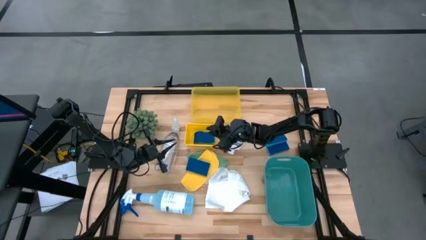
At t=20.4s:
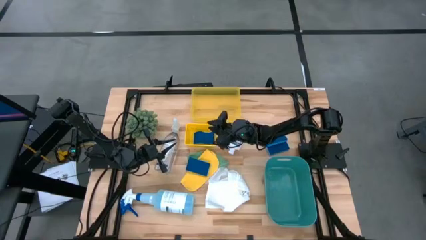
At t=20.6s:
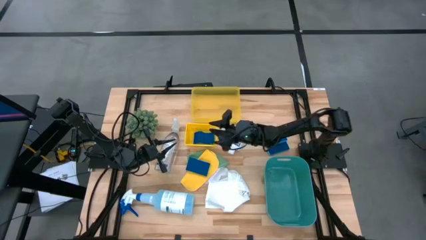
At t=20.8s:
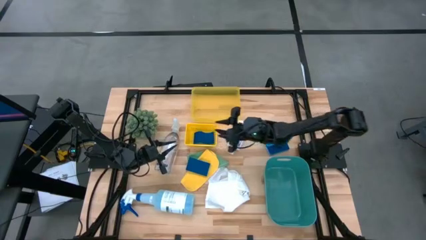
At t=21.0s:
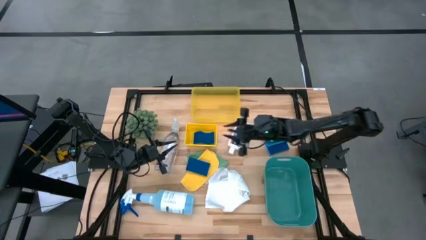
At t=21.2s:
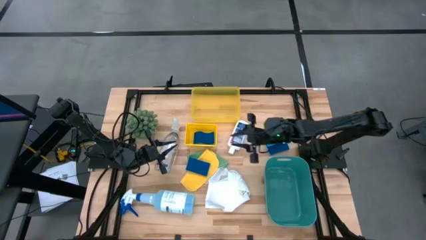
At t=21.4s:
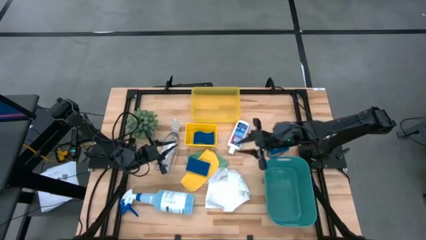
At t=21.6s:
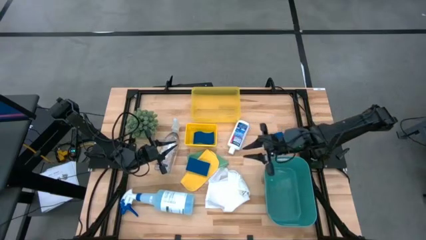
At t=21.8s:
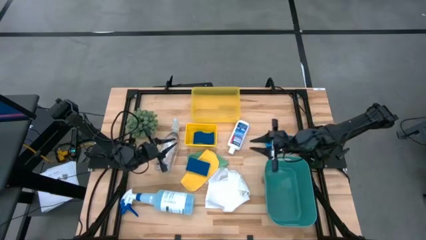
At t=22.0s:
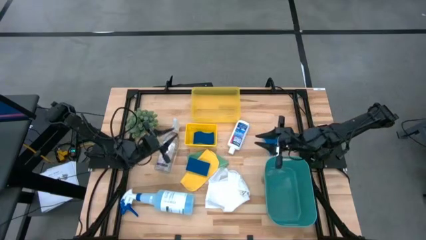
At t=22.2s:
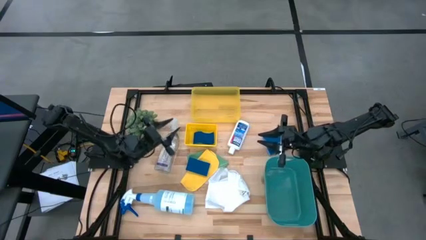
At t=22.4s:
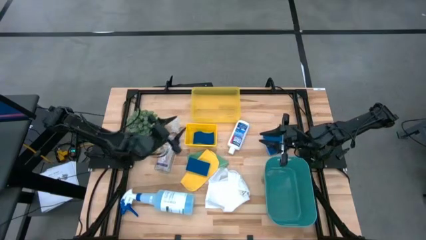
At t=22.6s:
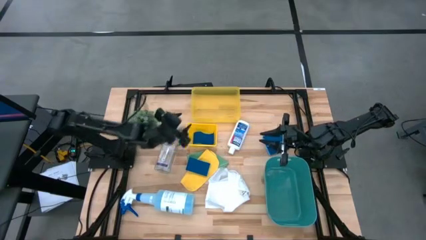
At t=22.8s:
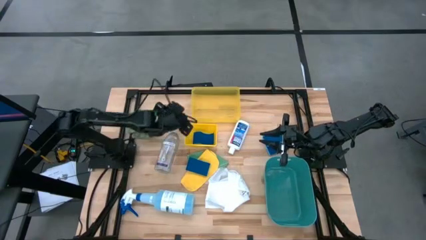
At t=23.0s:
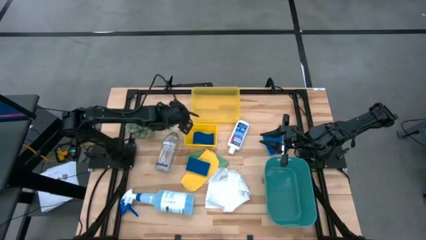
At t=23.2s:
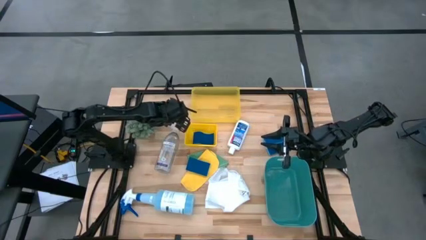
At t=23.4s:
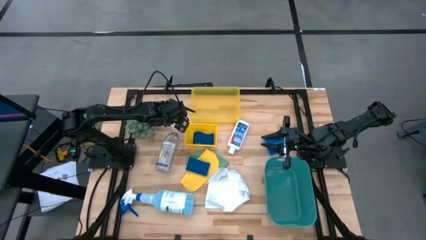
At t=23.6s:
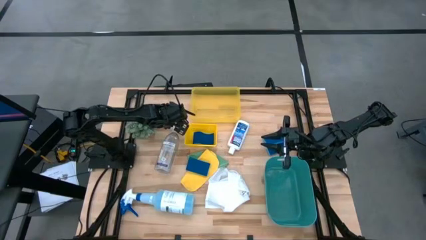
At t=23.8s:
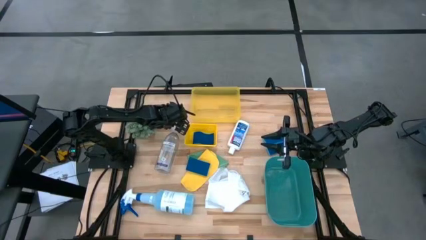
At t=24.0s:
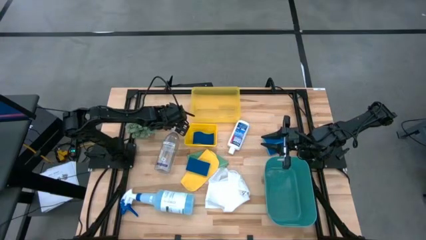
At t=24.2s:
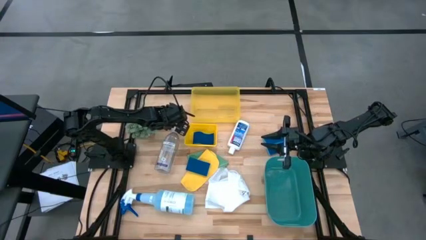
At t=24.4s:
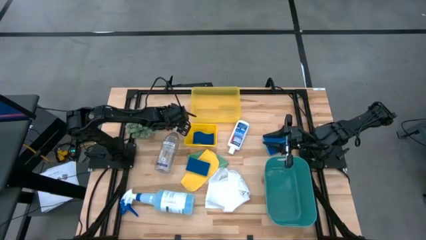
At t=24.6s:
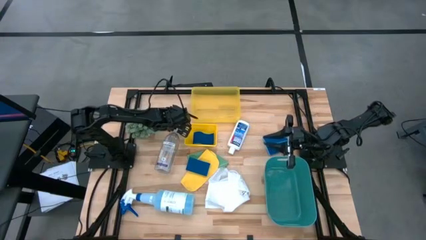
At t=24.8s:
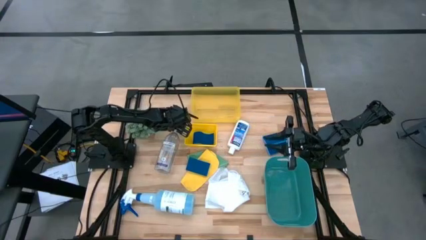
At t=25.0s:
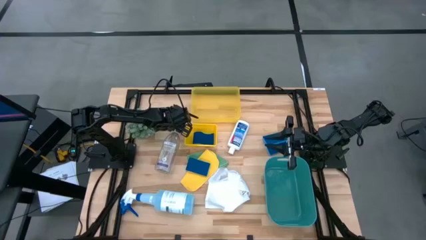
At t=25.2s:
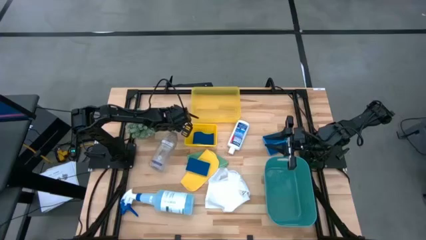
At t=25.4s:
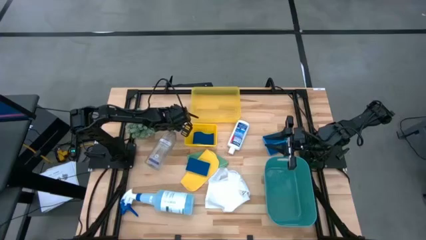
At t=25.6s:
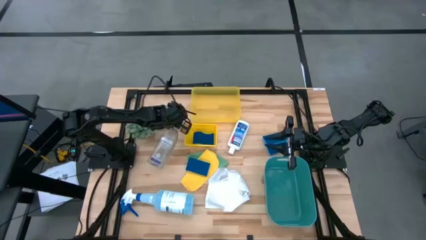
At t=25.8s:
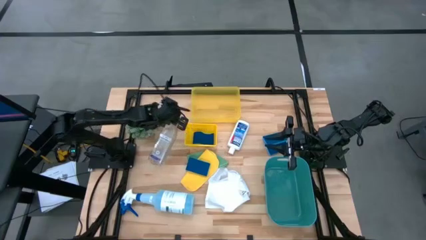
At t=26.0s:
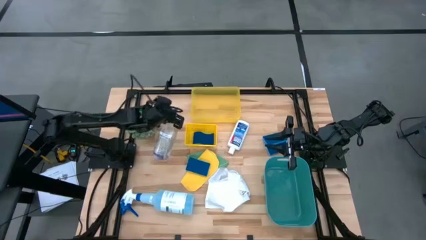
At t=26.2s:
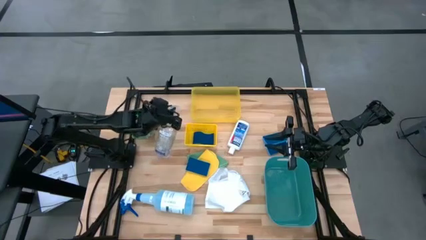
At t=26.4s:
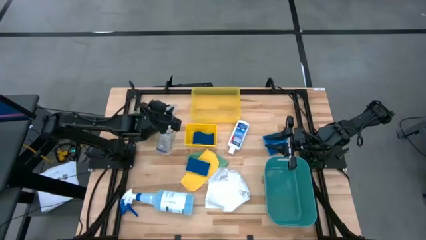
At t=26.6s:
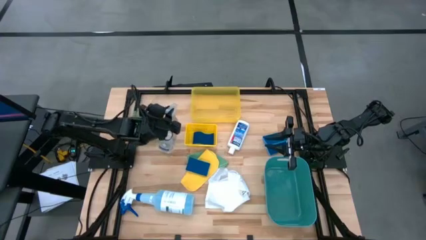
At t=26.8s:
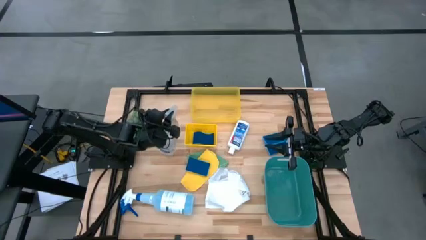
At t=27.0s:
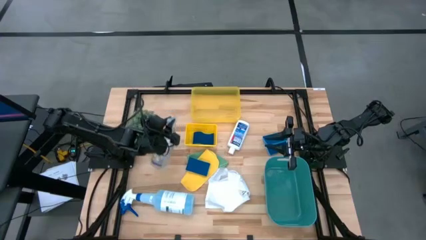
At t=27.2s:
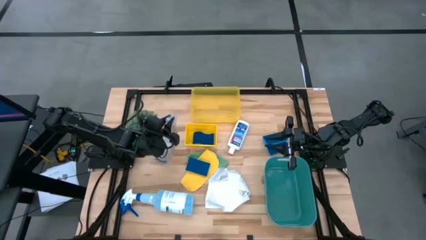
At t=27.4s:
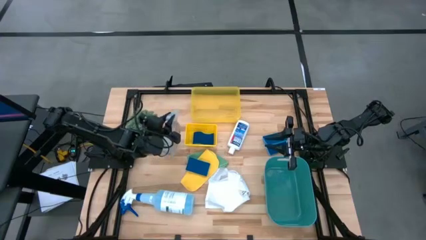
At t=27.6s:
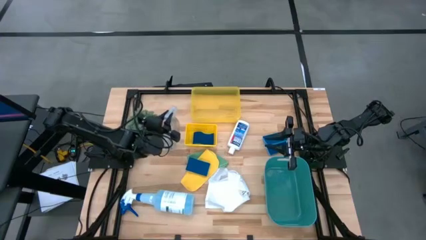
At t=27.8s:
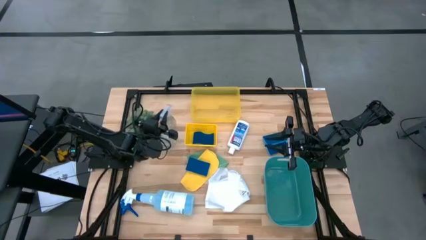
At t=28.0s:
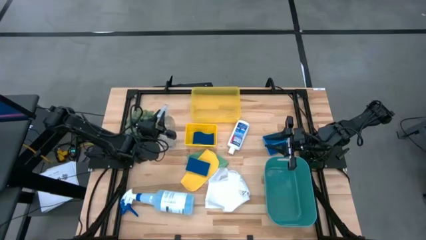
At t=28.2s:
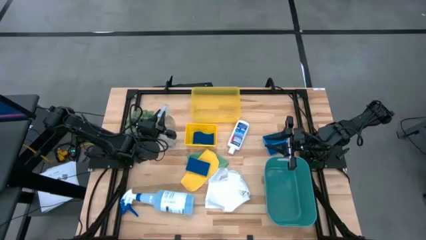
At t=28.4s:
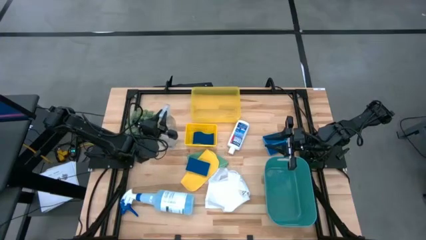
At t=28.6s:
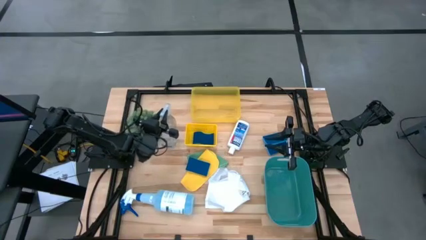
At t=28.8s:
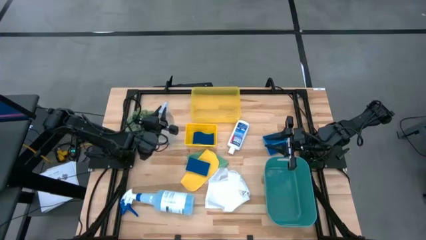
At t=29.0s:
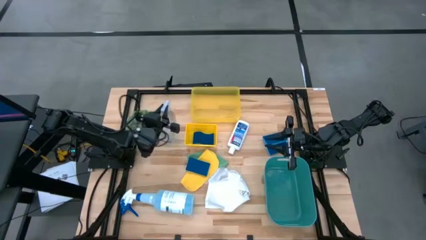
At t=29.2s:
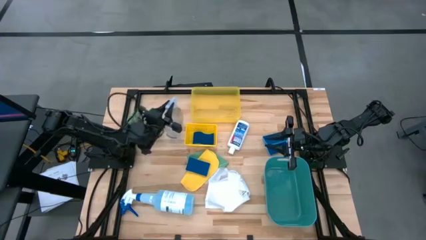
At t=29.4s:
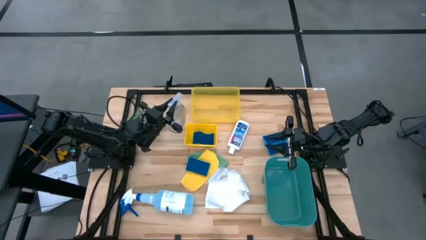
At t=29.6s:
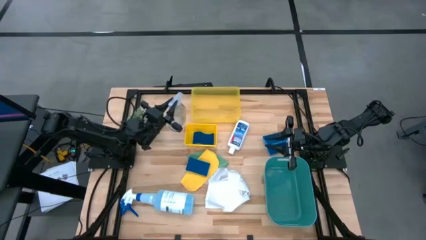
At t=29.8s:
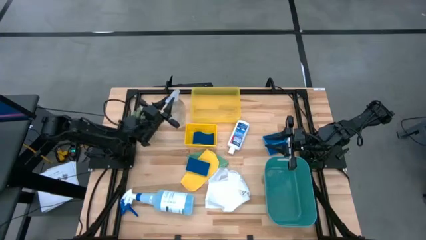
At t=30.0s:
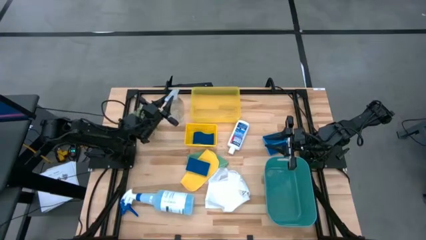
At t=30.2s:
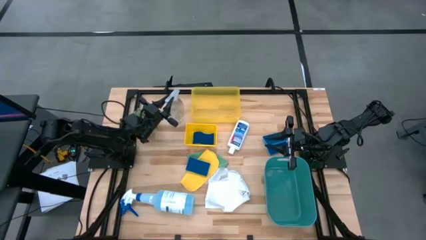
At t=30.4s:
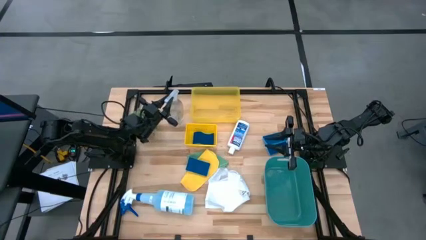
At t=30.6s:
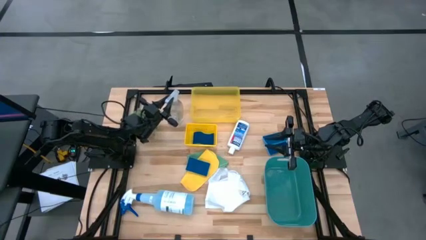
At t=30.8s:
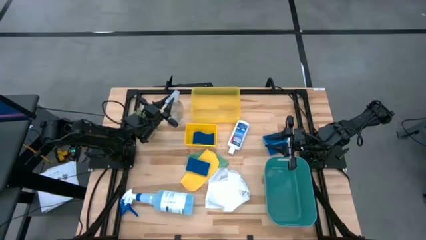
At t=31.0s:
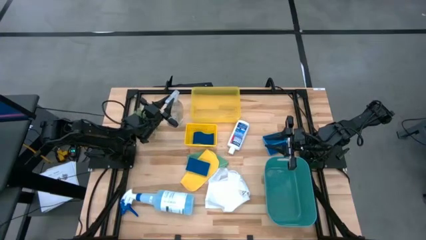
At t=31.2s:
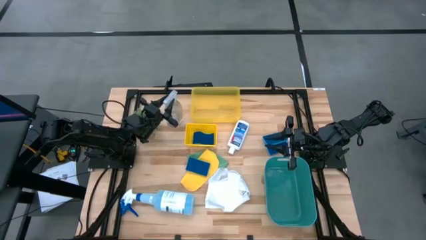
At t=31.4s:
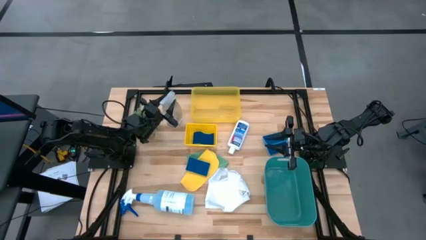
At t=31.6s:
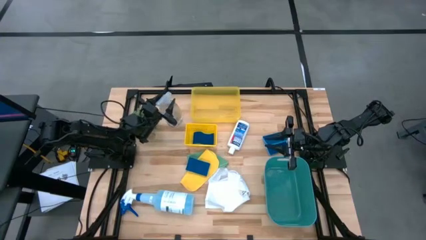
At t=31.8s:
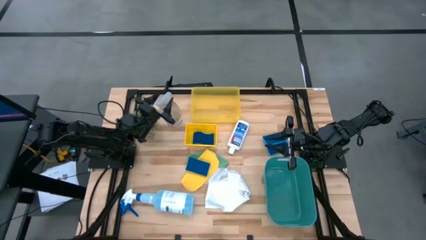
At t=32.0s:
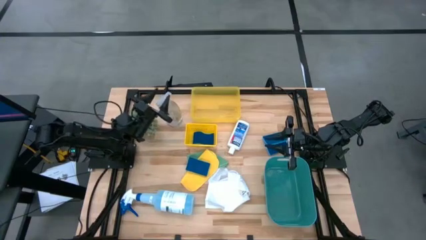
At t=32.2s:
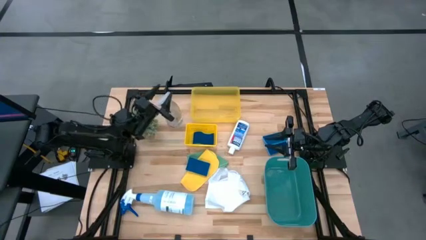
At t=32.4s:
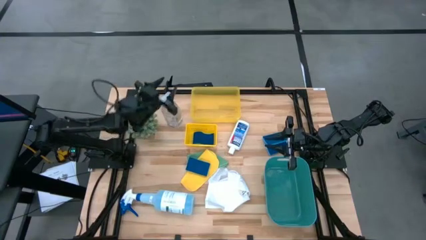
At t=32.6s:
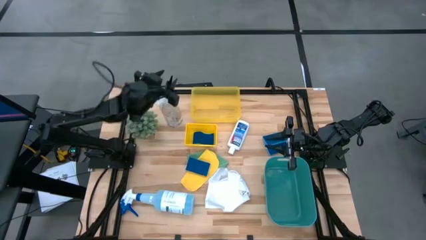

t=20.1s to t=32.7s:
Task: Pick & Place Kitchen Items
Put the transparent spray bottle into the top yellow bin
